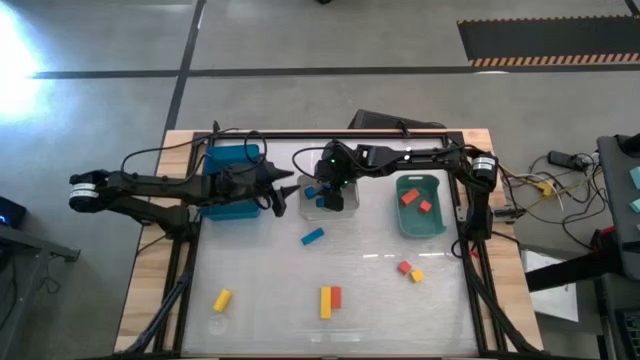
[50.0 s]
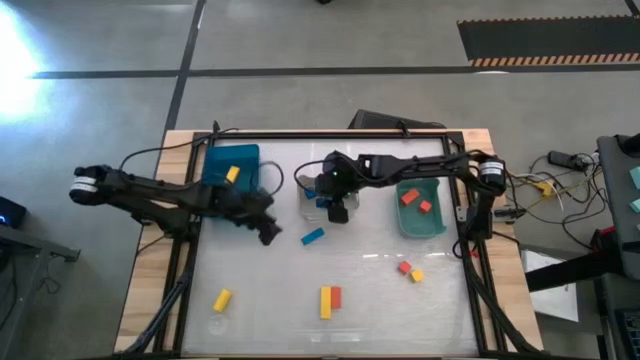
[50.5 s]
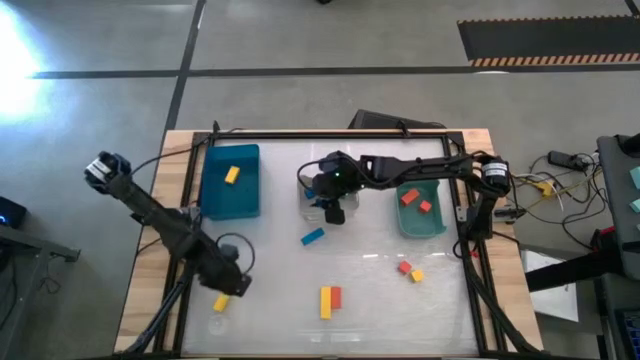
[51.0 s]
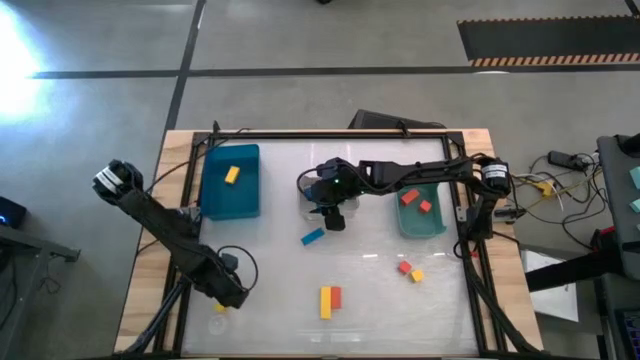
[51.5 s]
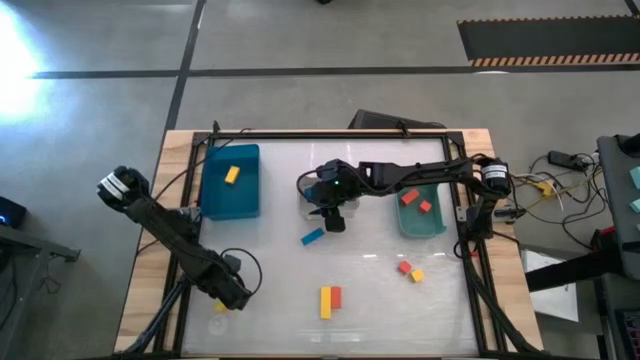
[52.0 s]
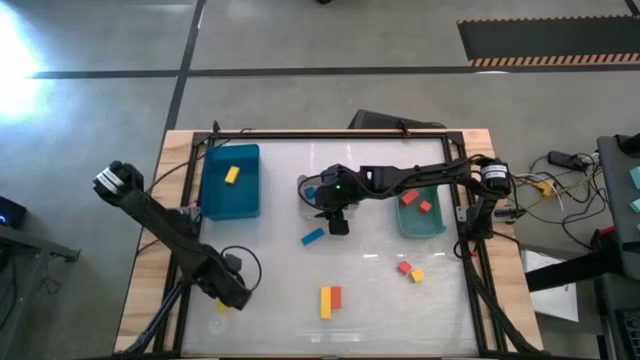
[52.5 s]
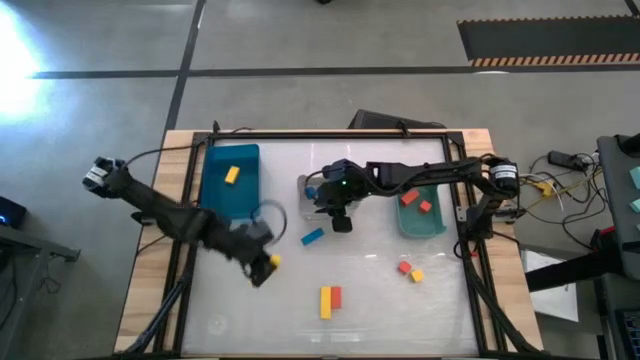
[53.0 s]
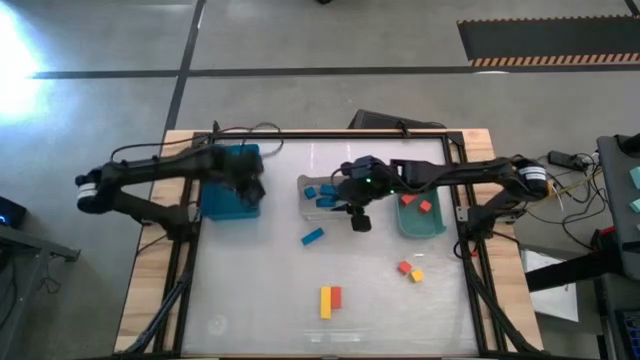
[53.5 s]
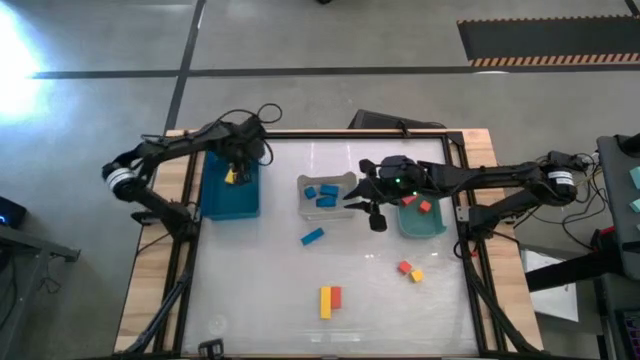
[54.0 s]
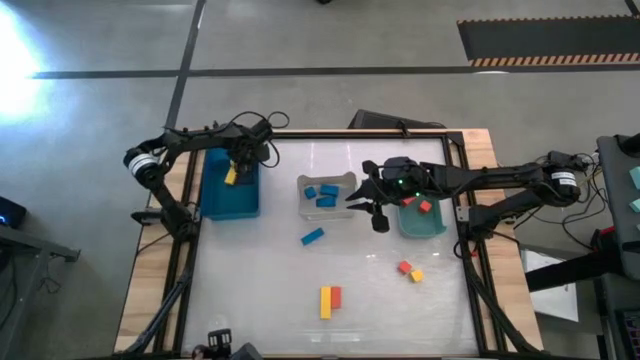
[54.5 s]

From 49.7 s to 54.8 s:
Task: Sort & place blocks by color
Put the yellow block into the blue bin

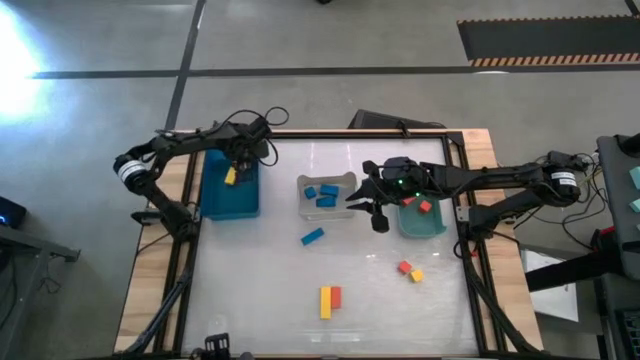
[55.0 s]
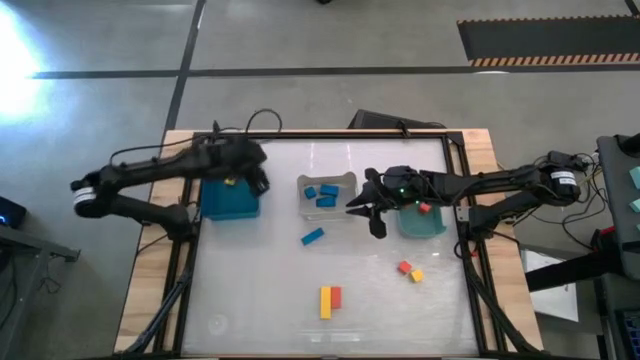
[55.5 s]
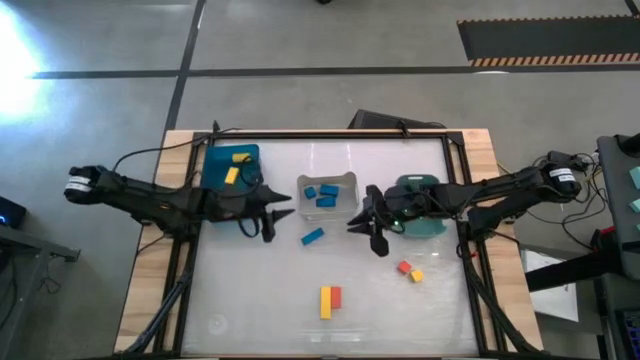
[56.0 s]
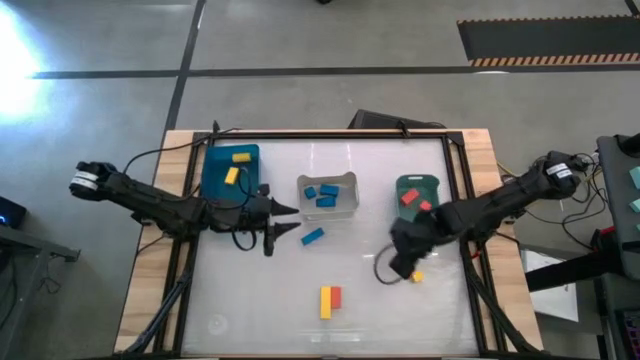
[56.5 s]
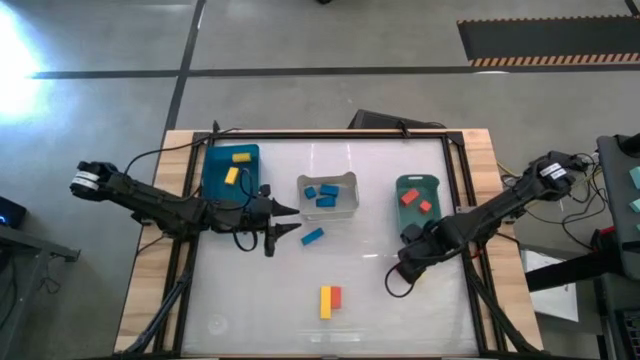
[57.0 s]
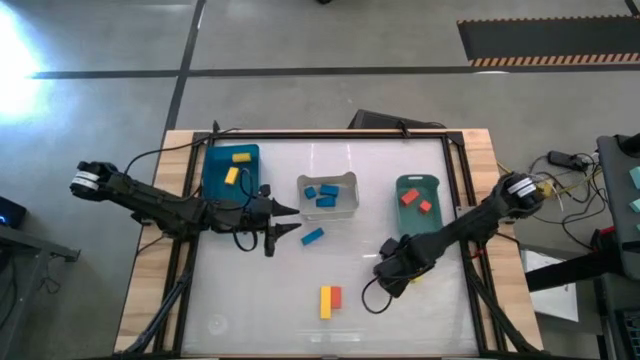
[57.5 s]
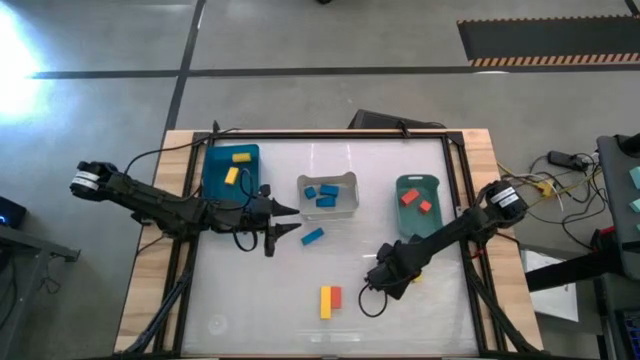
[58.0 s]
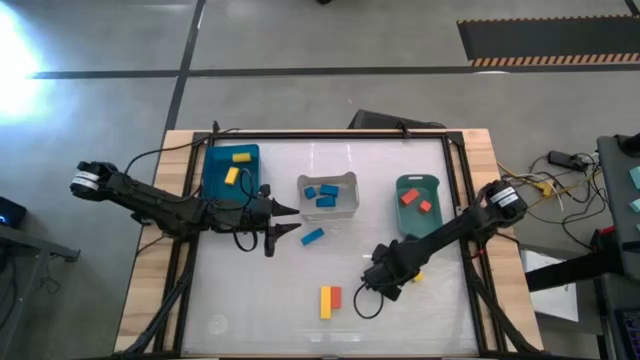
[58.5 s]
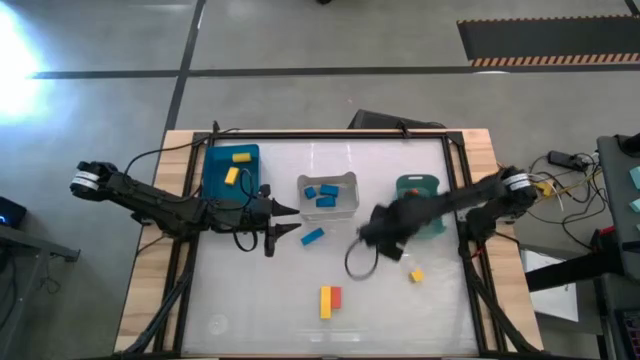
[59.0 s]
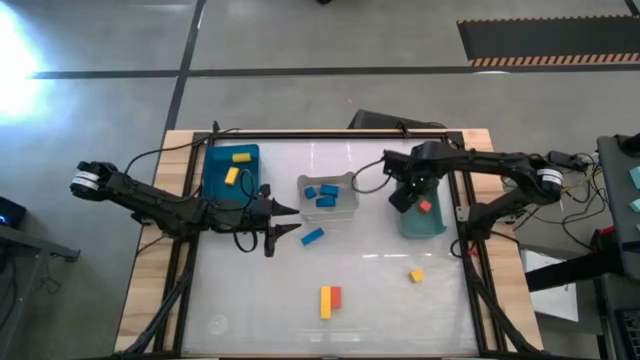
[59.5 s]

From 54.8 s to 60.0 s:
Put the orange block into the green bin

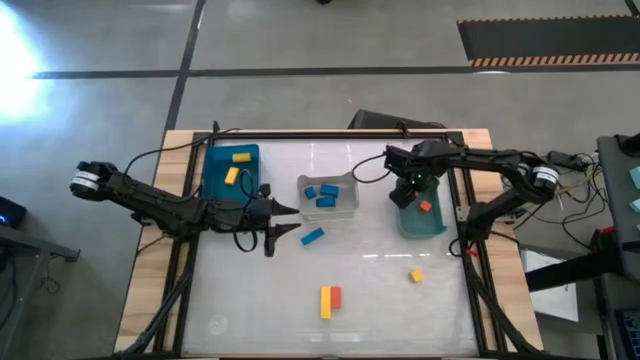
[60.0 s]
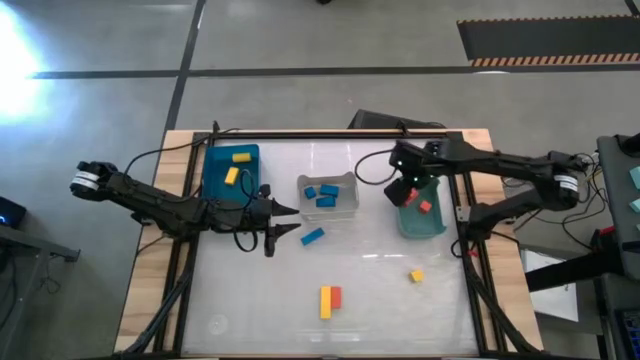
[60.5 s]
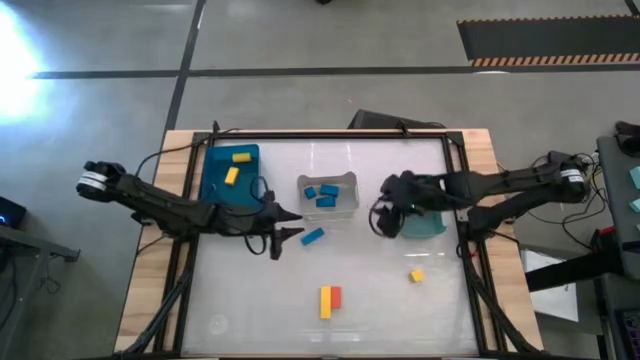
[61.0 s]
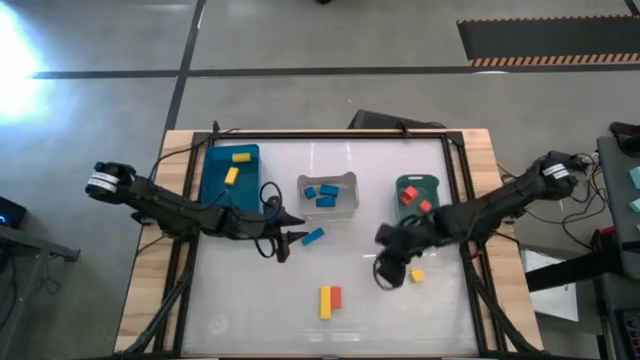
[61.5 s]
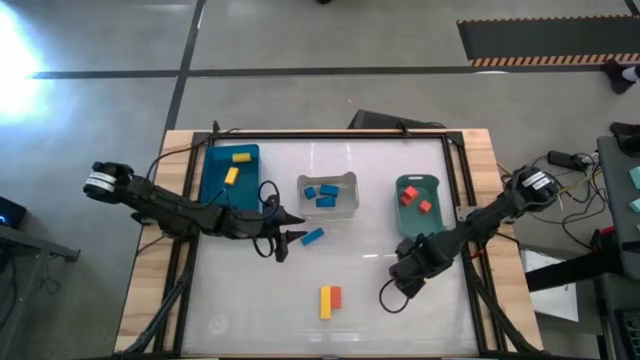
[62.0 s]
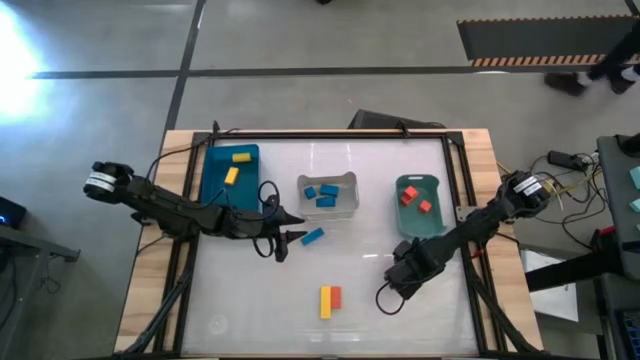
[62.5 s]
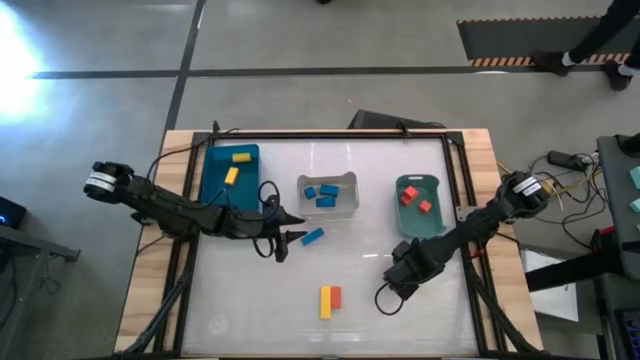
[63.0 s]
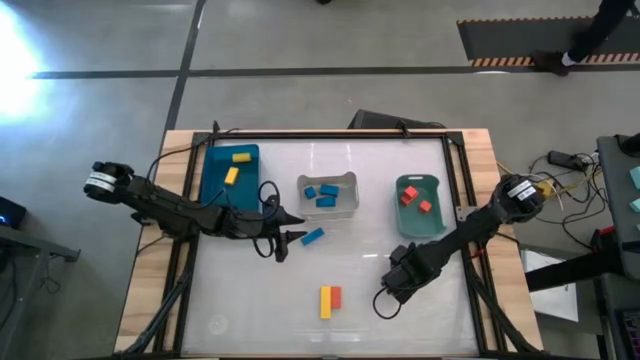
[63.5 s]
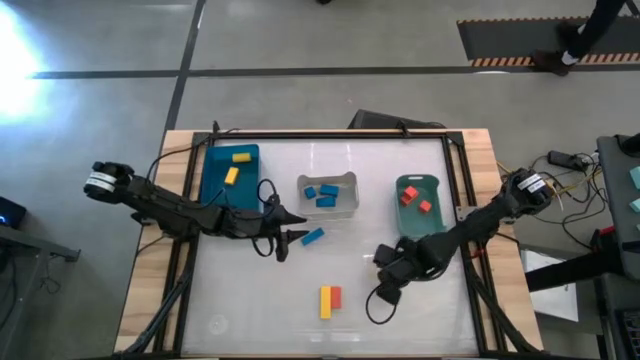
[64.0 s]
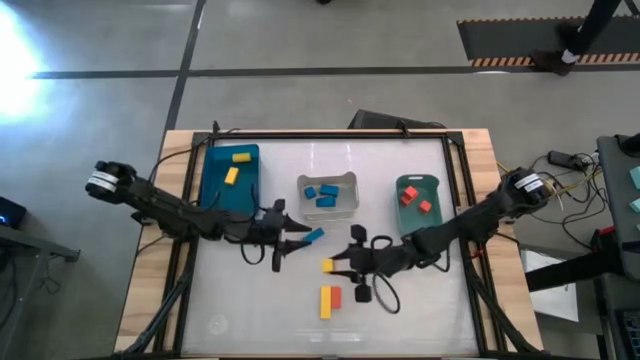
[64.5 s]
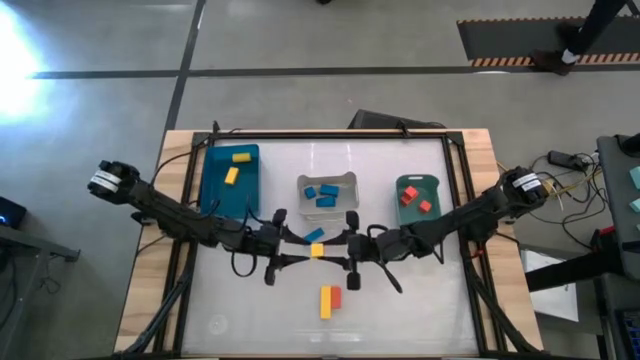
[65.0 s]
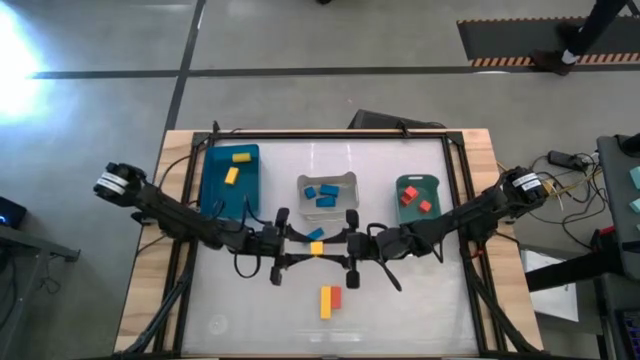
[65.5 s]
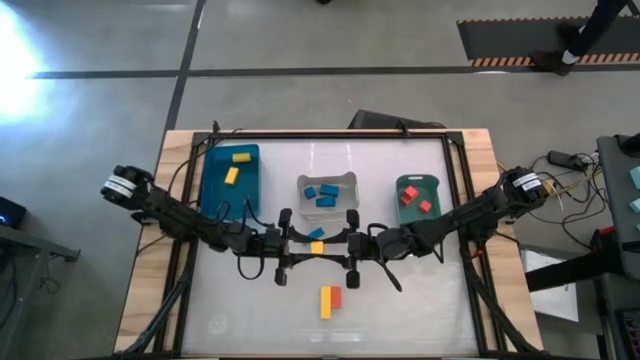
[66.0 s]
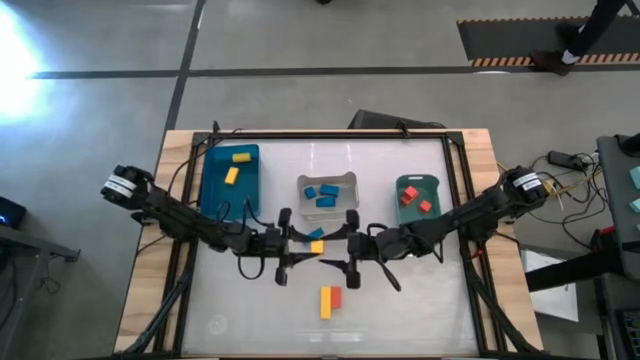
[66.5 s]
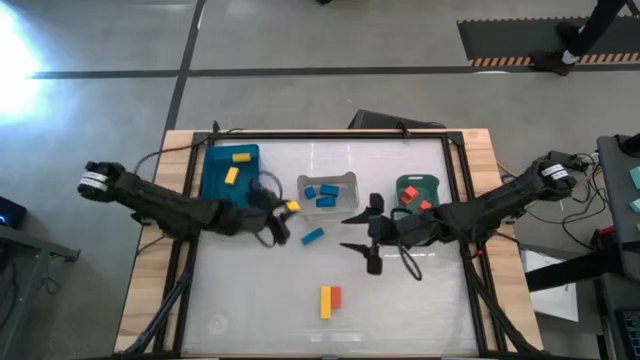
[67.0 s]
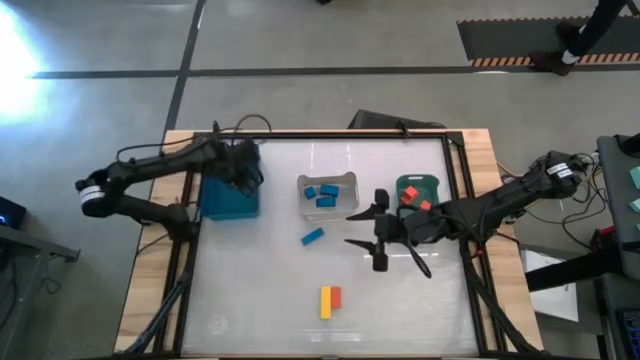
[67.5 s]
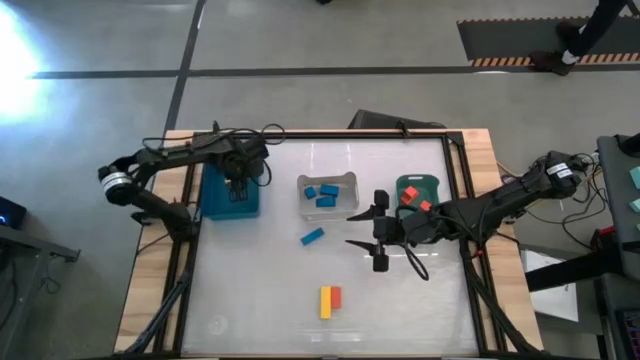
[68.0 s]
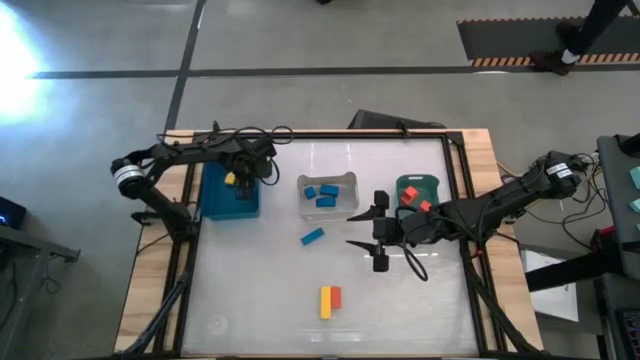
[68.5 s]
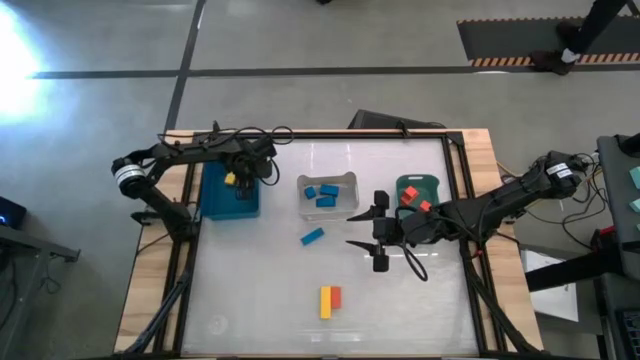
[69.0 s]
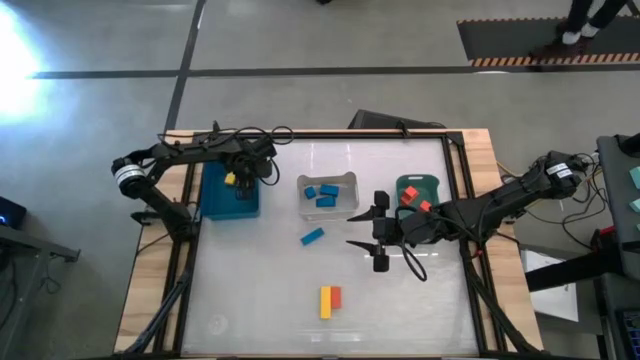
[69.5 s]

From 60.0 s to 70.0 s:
Put the yellow block into the blue bin

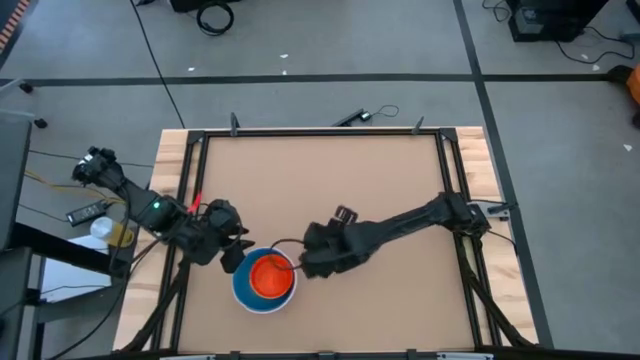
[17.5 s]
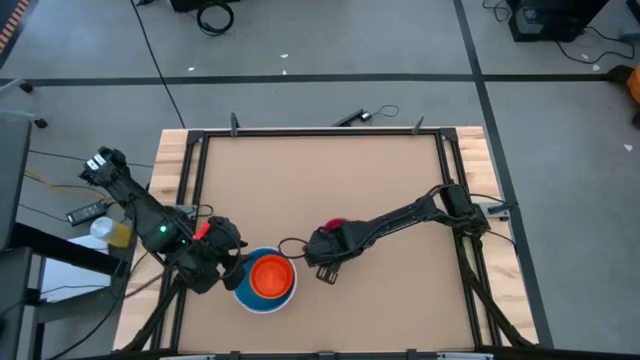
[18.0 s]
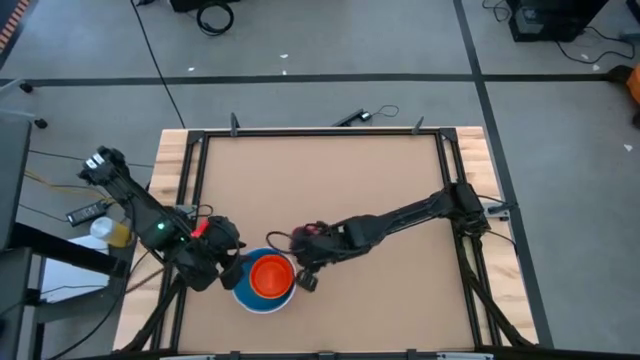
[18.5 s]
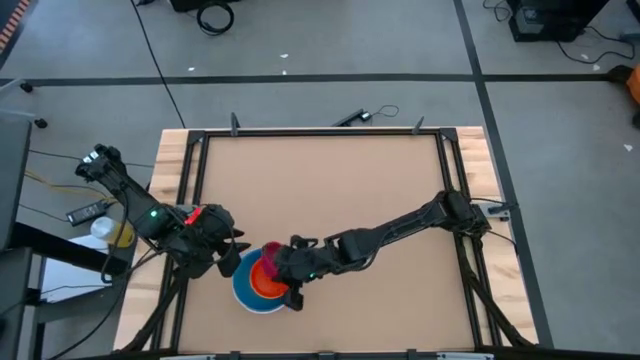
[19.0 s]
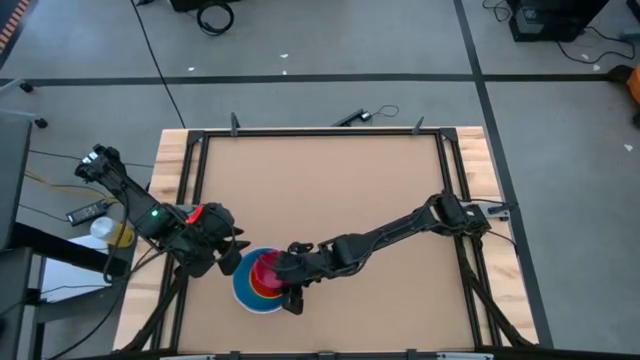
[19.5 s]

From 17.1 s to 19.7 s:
Task: Nest bowls inside each other by size order
Stack the red bowl on top of the orange bowl
